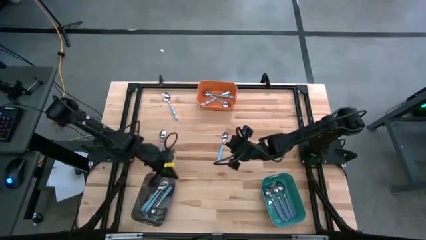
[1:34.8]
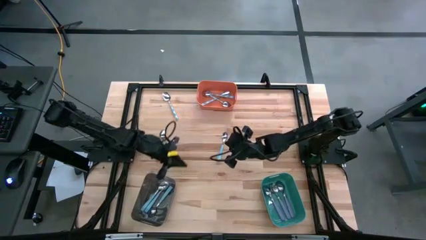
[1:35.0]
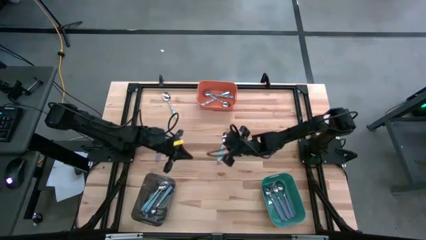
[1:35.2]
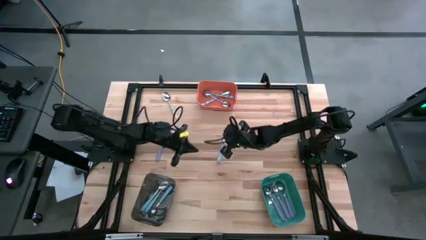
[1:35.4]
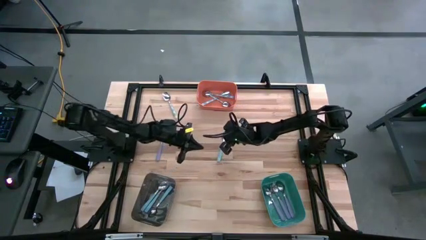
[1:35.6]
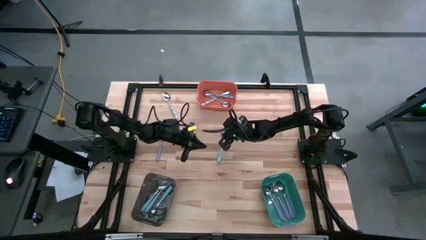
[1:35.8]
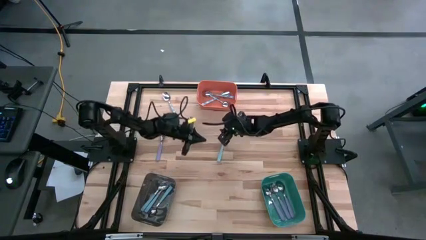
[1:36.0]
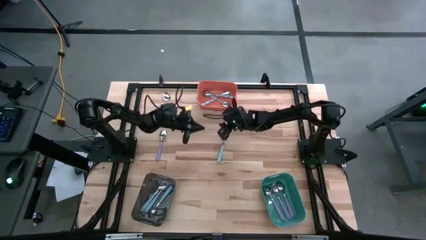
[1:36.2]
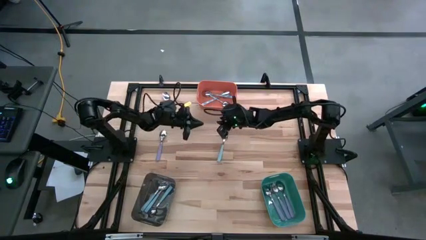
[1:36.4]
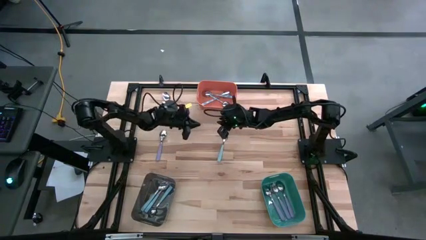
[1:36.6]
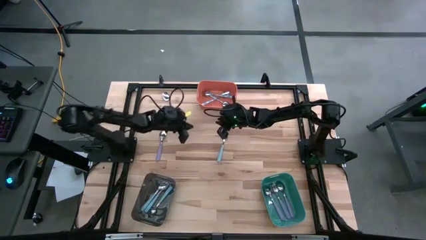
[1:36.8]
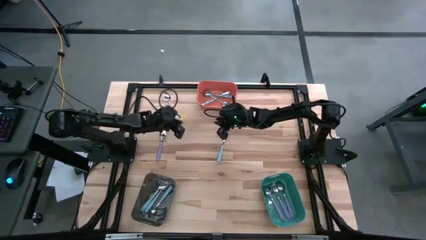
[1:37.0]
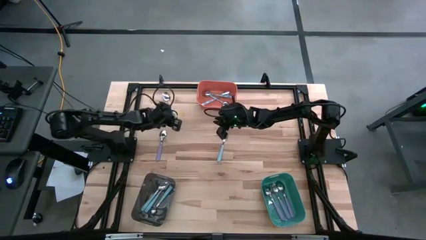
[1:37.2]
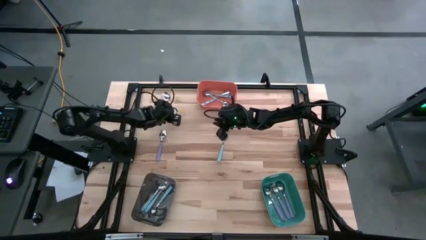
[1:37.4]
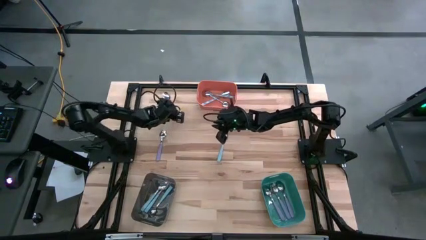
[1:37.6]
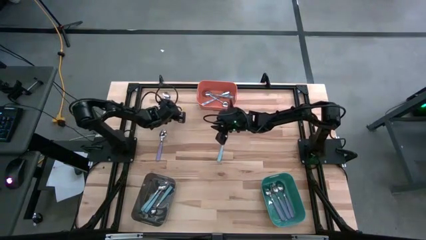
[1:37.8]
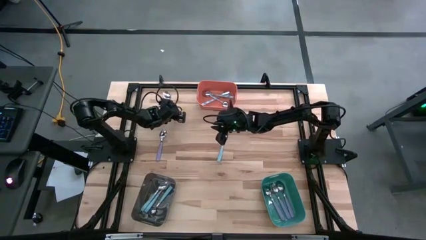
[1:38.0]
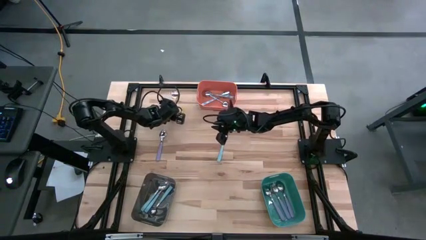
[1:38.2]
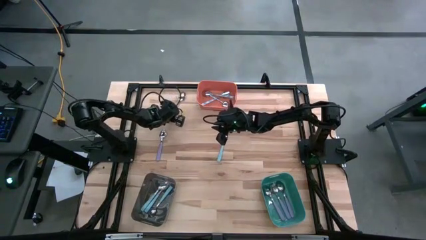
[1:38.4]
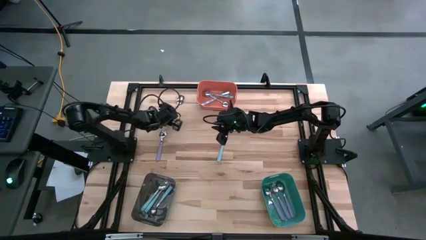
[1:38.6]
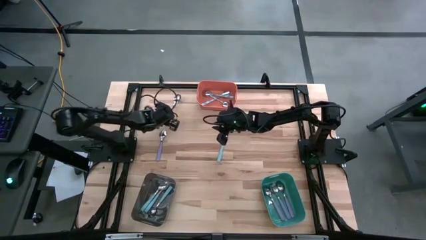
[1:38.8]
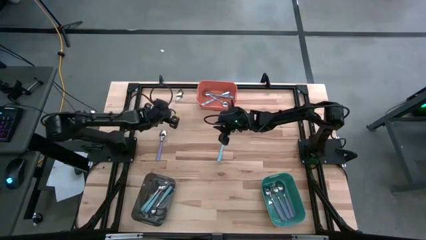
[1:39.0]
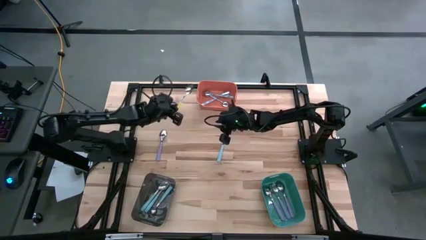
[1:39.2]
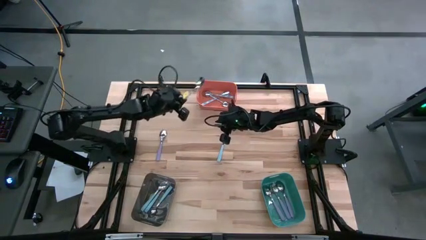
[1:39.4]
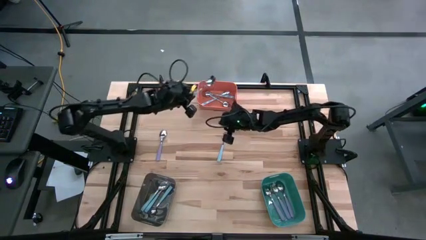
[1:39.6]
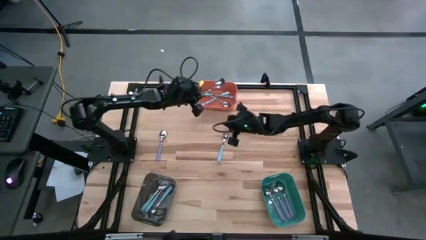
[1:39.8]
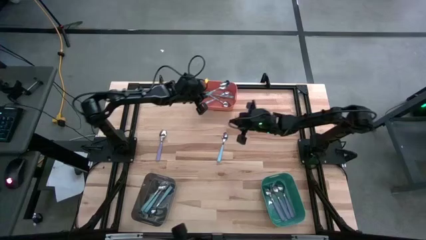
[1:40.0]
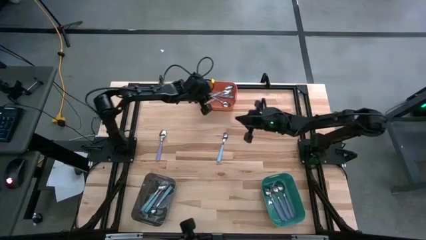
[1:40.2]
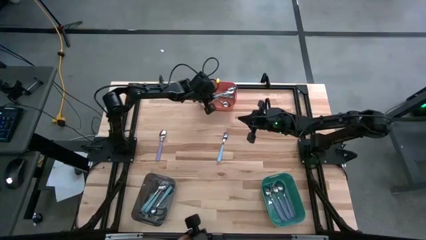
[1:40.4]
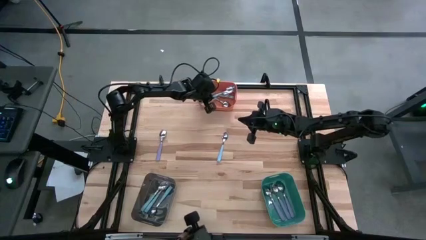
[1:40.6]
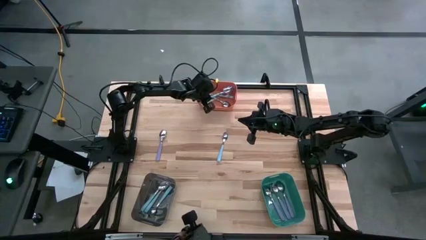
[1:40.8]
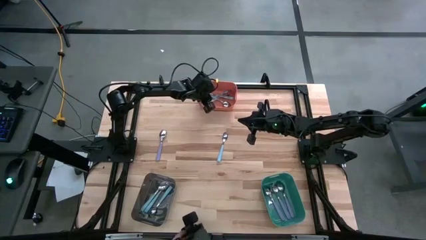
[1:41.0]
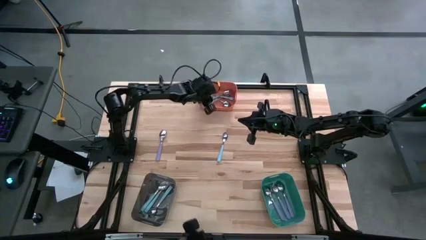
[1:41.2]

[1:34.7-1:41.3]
Task: Sort silverware by color (type)
Put the blue and white spoon into the orange bin

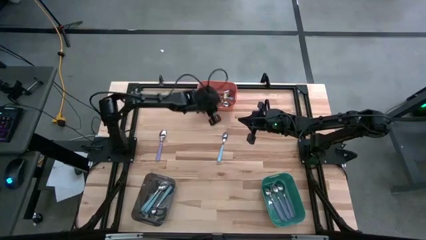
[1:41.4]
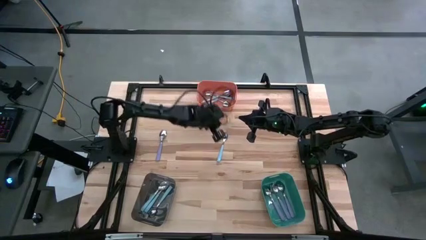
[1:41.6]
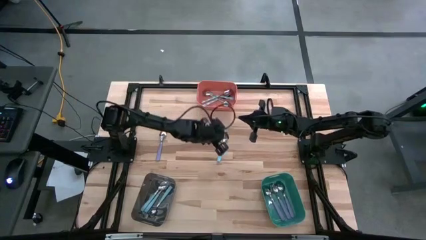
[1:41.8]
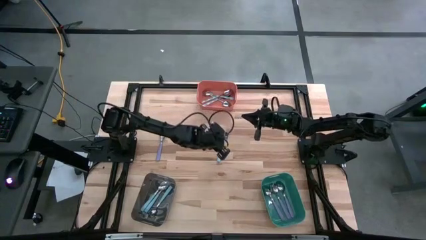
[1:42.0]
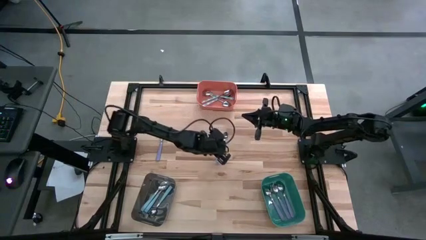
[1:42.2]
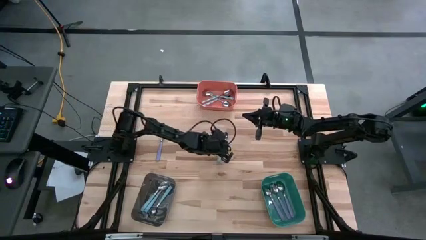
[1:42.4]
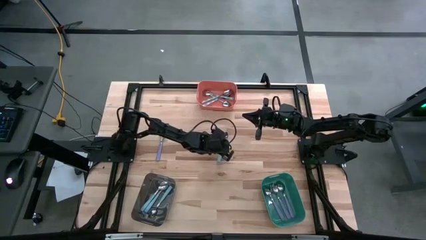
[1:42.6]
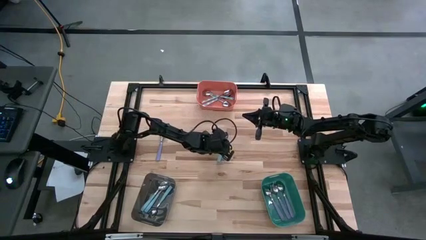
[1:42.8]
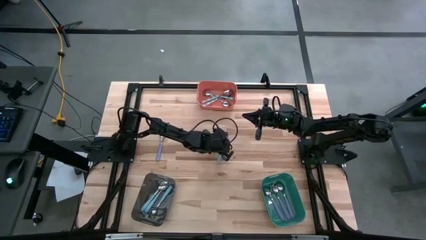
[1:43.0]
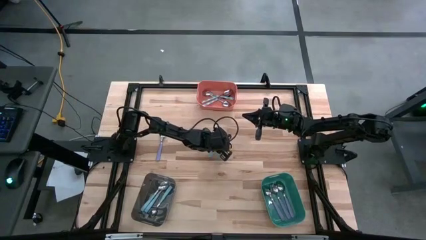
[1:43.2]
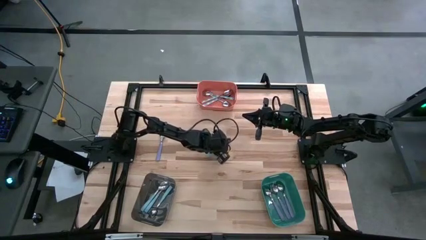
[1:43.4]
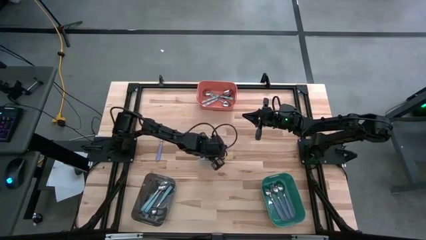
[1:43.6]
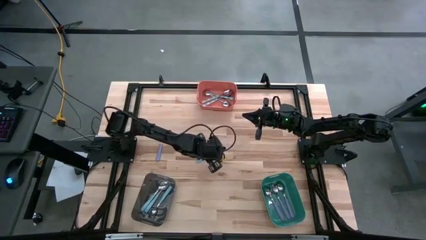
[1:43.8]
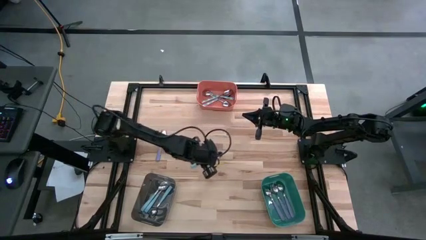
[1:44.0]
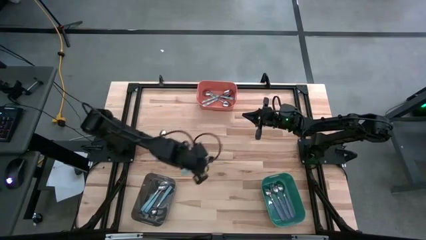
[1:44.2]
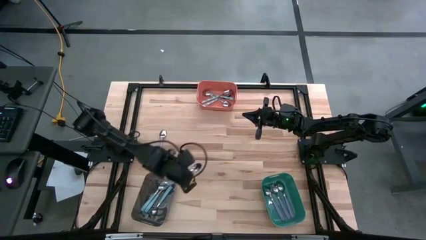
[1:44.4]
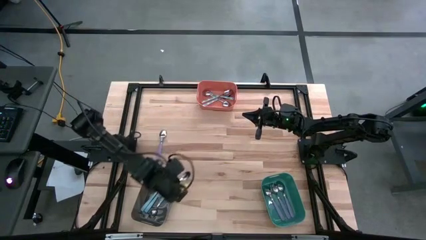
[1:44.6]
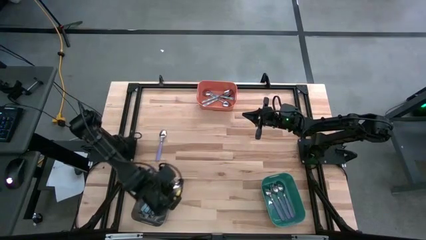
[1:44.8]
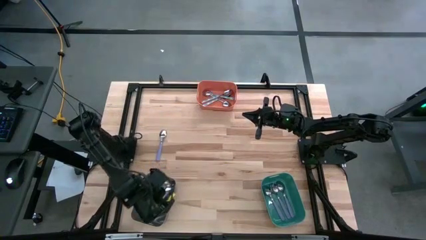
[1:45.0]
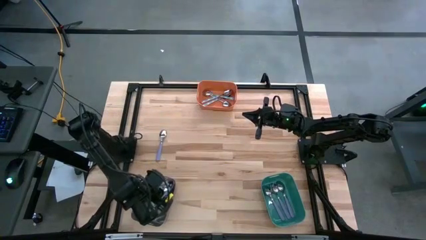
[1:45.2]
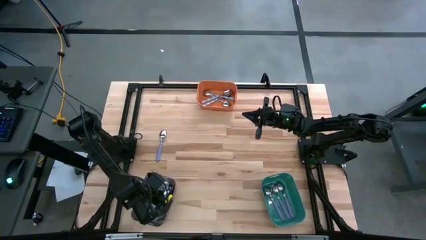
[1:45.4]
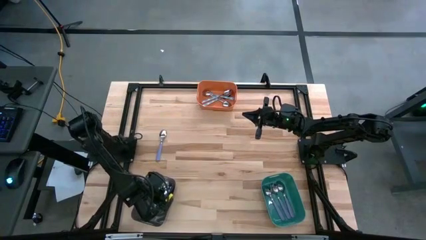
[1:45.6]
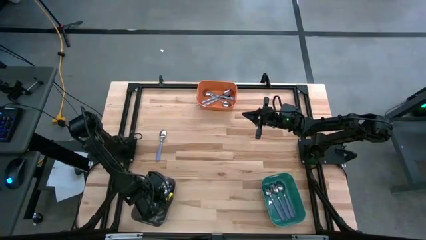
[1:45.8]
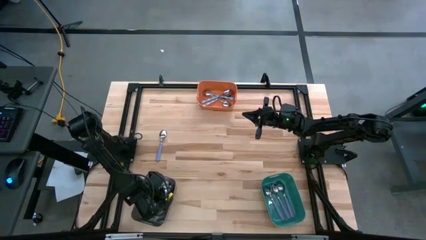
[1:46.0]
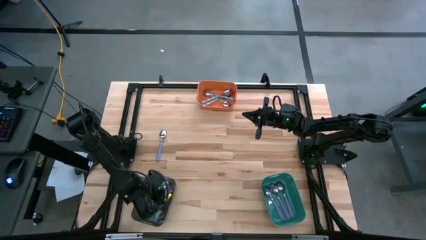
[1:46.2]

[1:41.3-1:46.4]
Put the blue spoon into the black bin

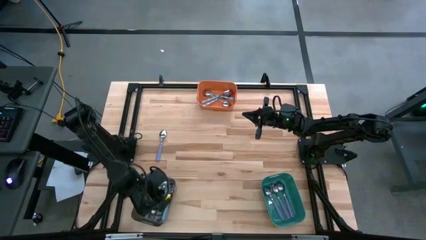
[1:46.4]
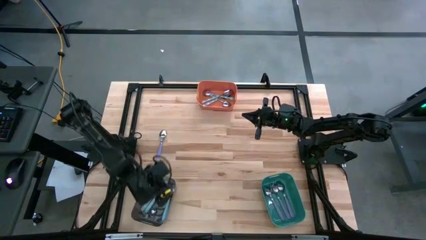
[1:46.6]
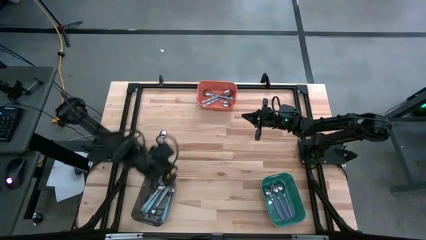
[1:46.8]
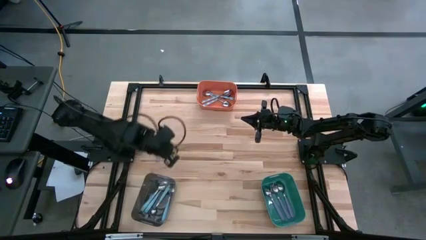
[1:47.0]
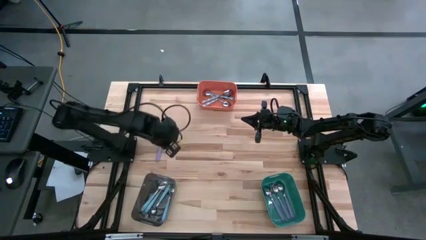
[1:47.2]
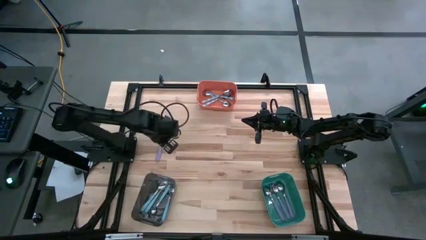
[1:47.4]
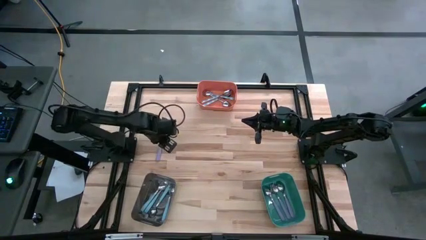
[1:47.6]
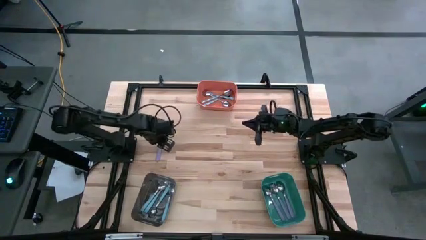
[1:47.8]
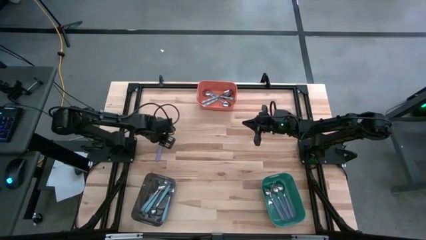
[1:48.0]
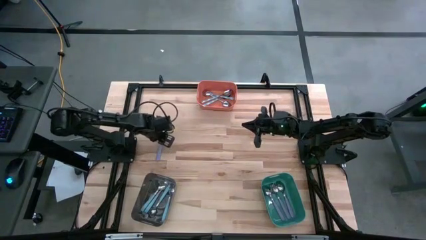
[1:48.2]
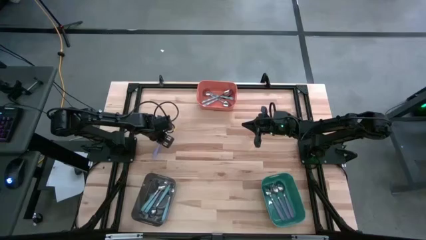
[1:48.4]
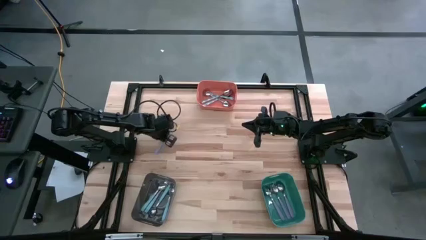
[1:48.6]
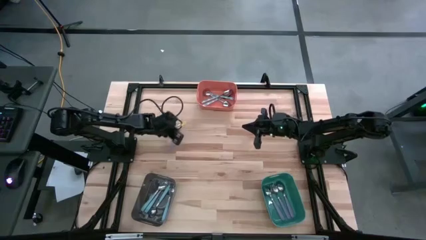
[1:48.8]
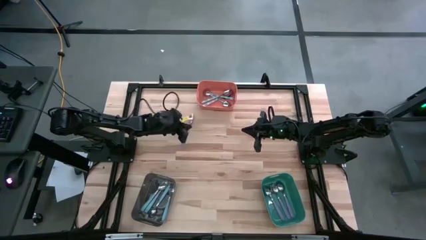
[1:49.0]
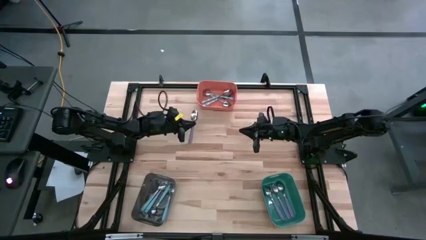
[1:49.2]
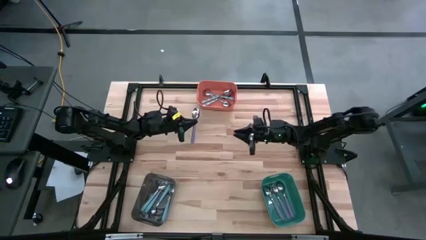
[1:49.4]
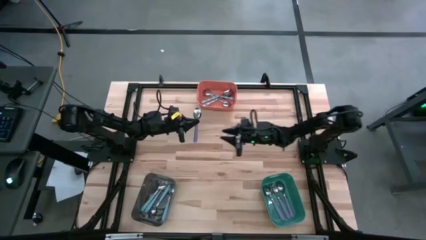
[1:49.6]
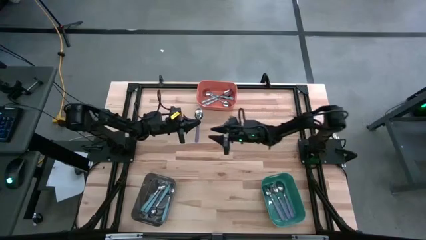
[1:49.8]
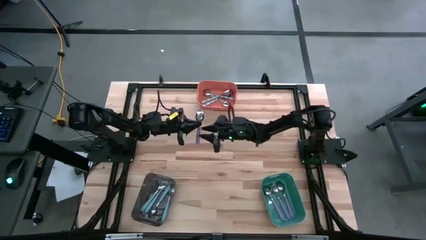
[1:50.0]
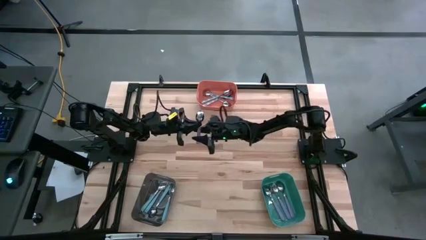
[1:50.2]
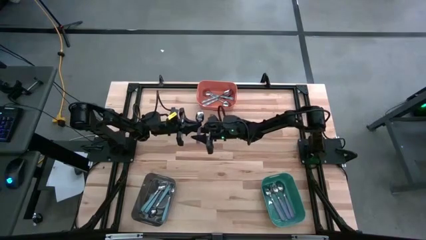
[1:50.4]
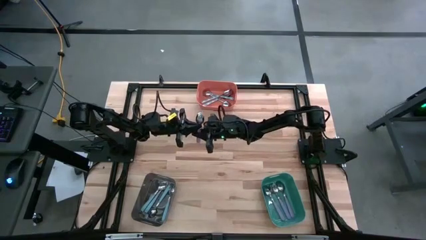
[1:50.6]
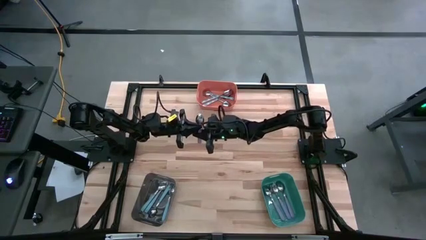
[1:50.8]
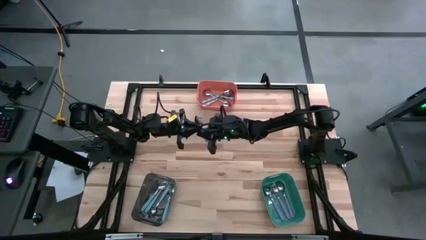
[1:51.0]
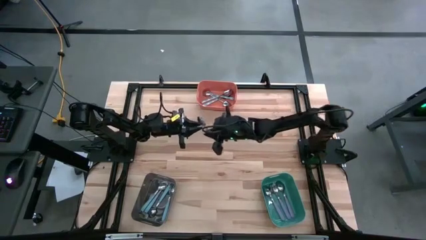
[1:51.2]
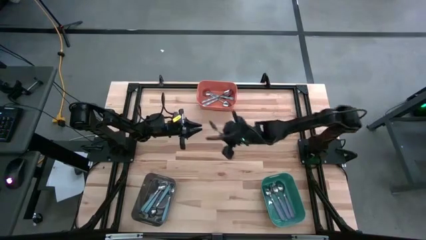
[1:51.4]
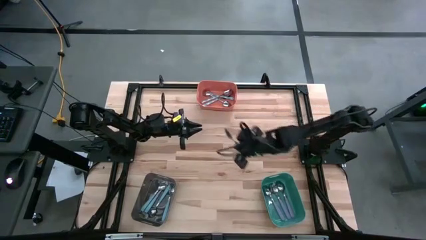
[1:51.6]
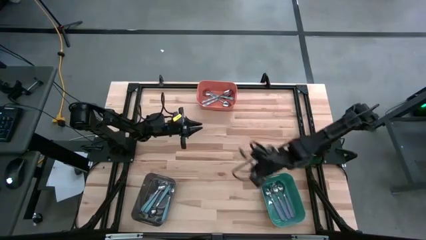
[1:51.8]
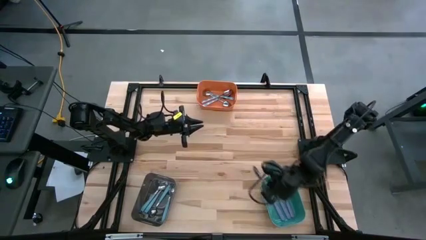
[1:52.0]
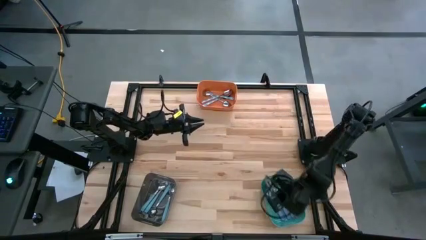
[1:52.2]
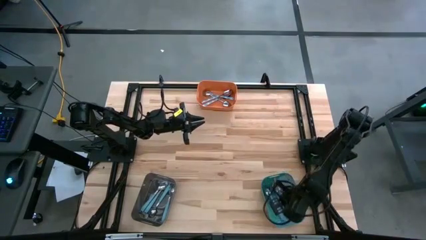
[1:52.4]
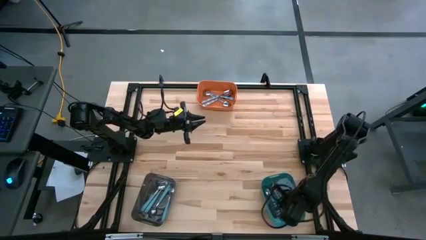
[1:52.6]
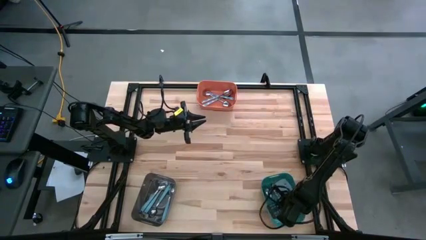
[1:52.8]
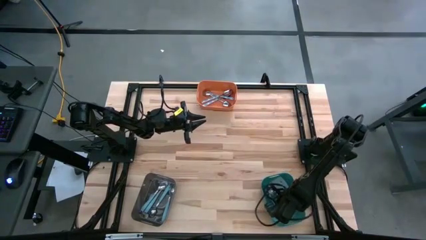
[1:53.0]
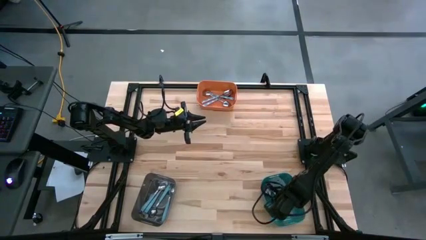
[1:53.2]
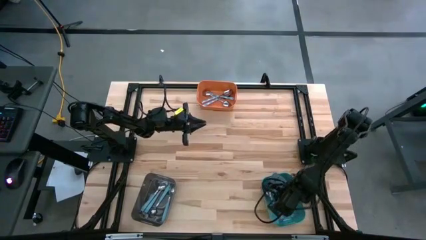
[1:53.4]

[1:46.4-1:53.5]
Put the violet spoon into the green bin
